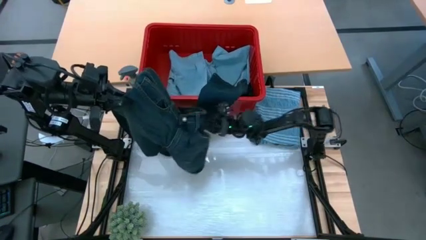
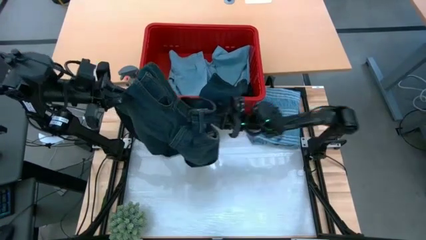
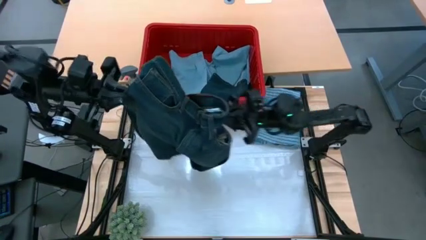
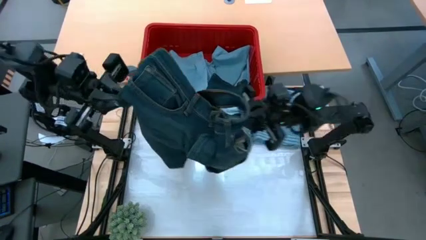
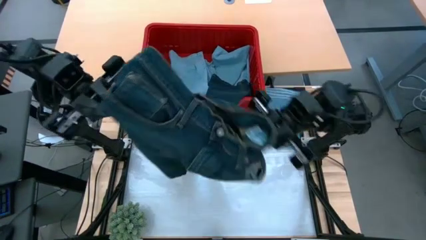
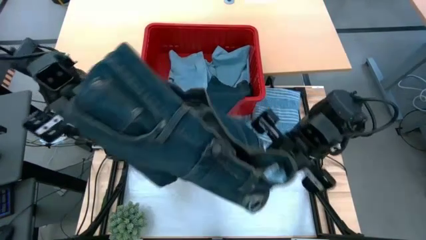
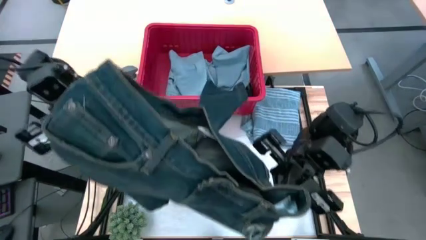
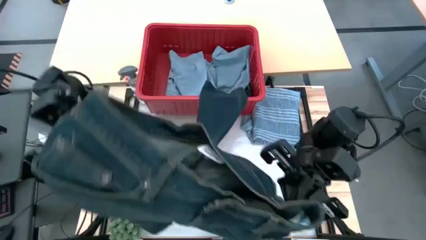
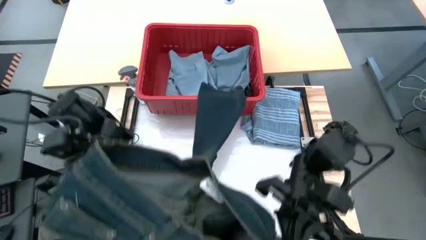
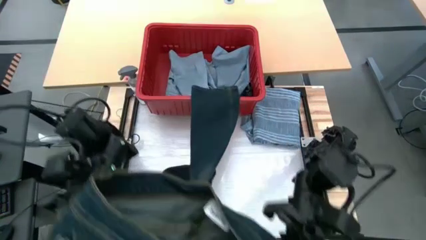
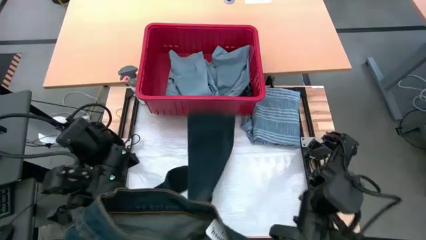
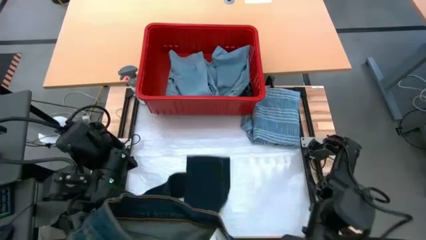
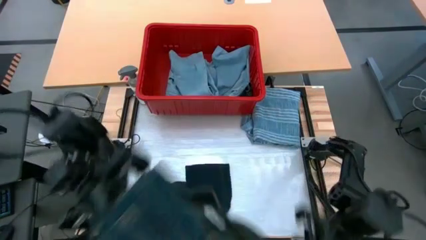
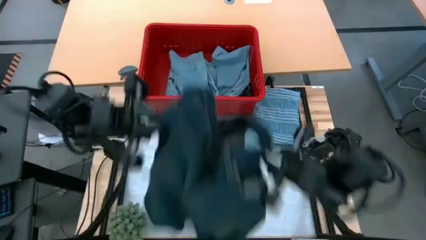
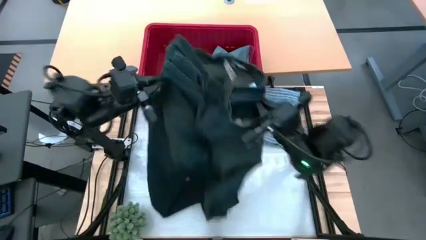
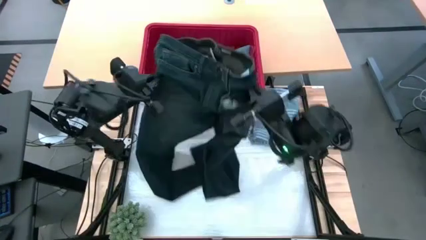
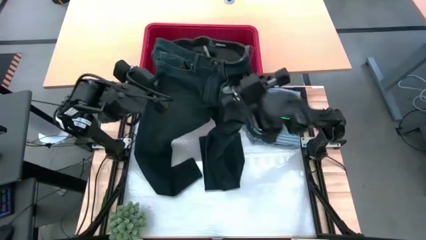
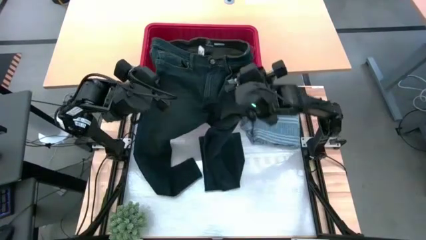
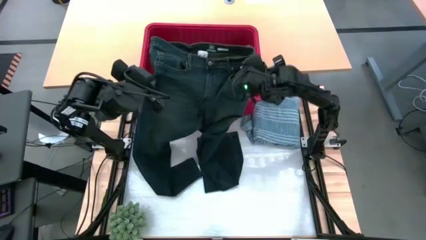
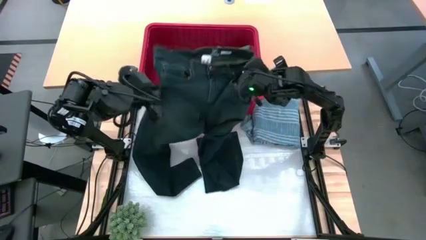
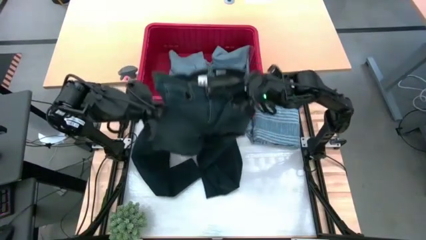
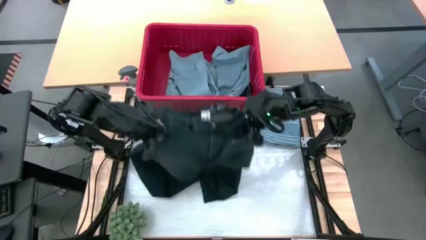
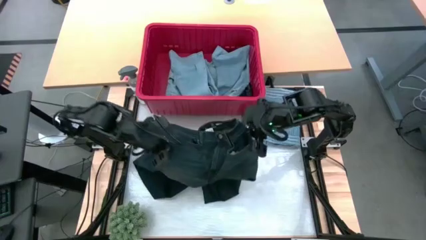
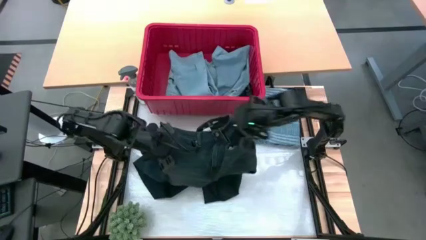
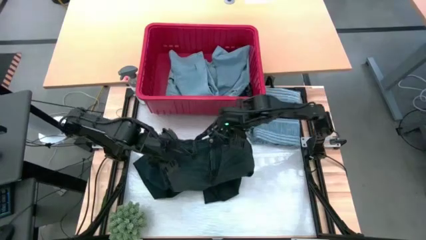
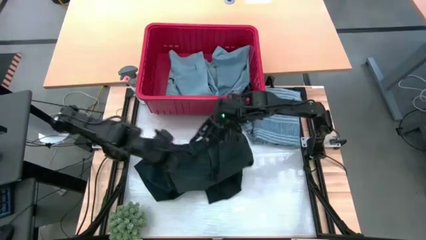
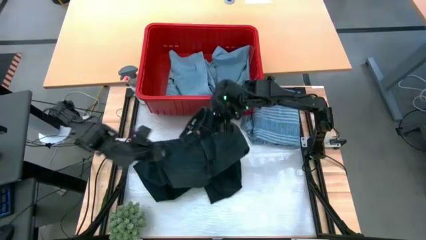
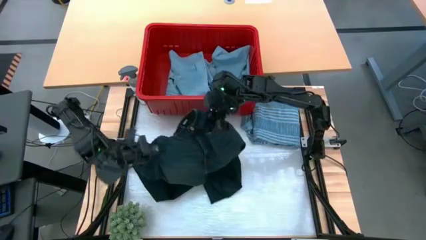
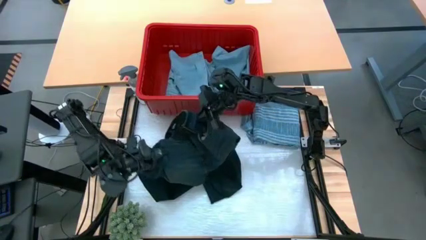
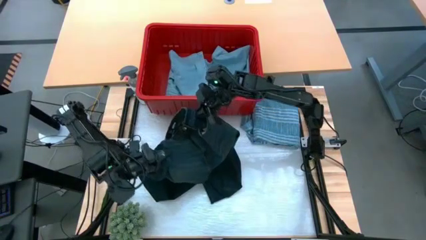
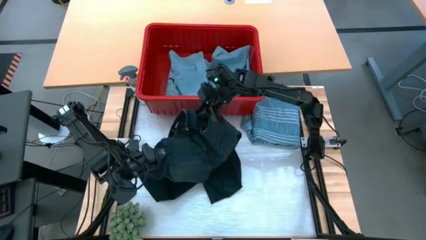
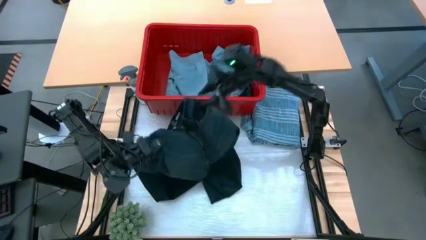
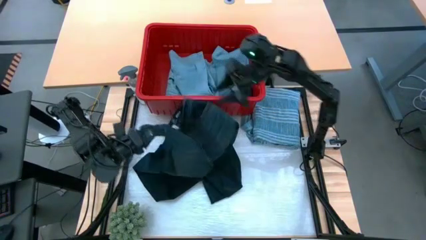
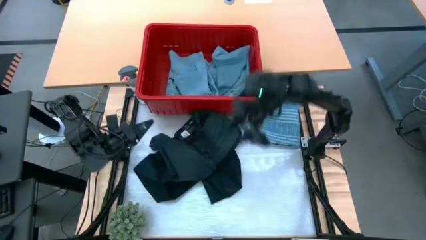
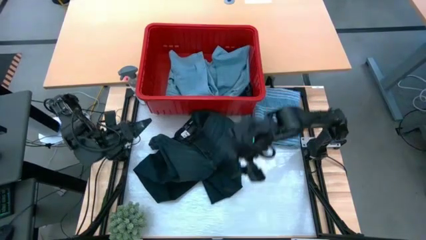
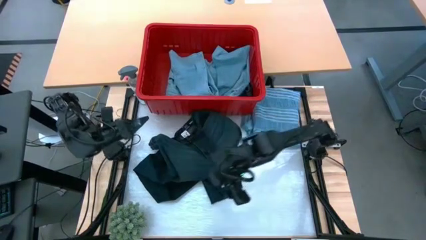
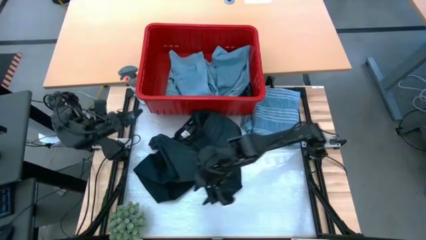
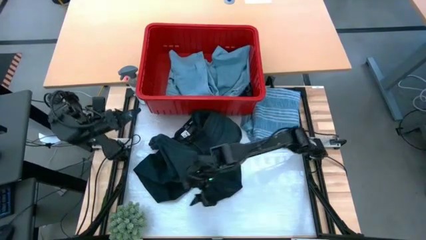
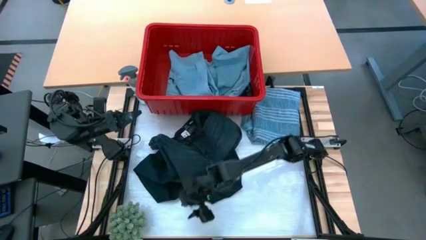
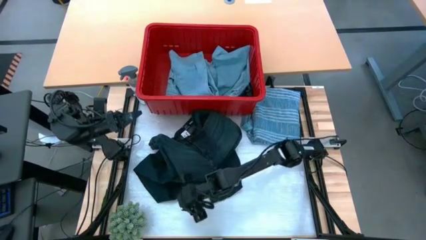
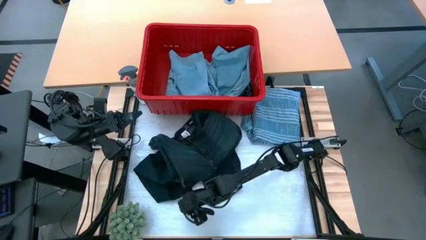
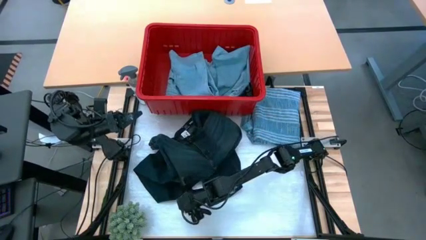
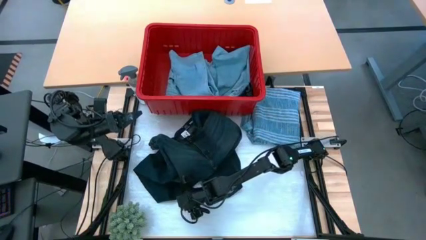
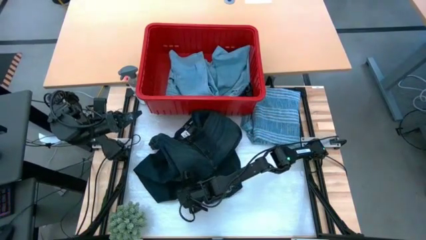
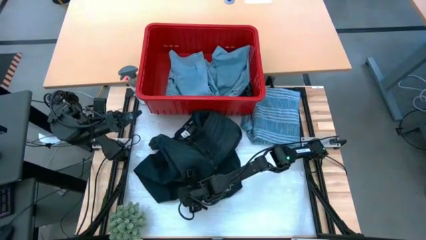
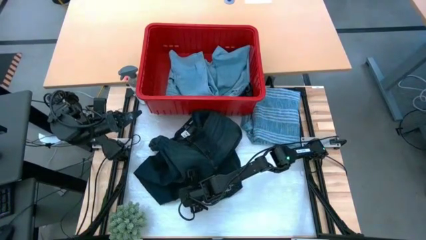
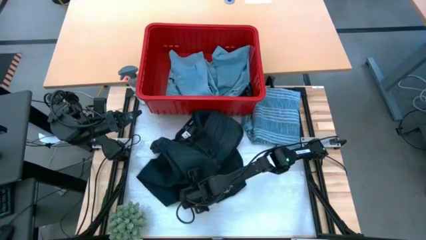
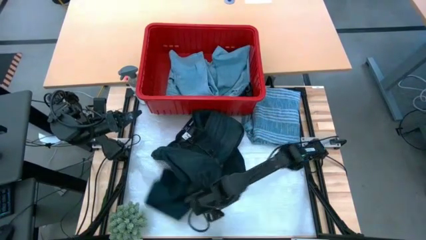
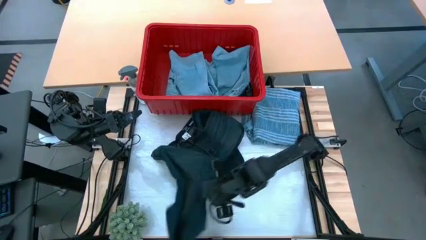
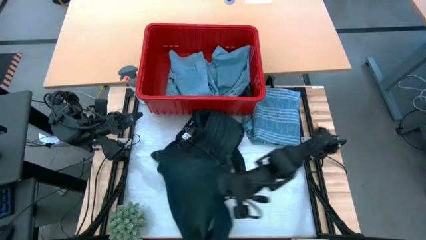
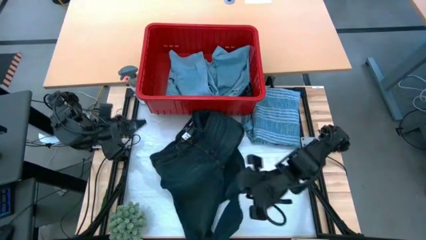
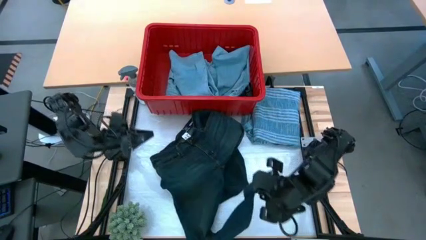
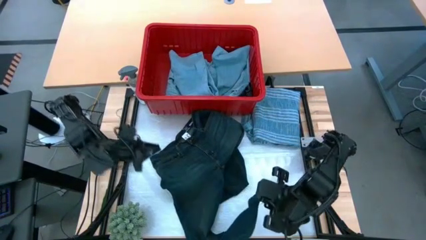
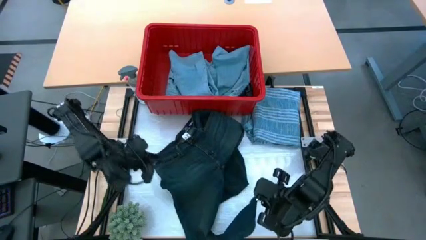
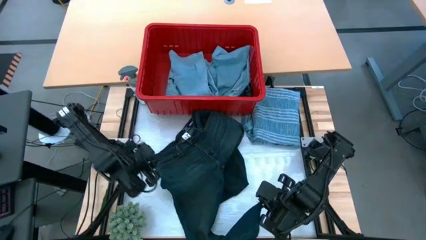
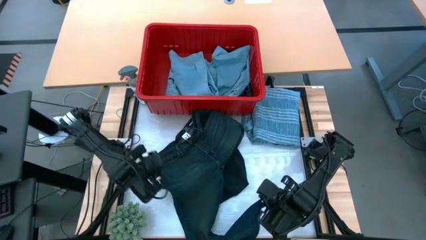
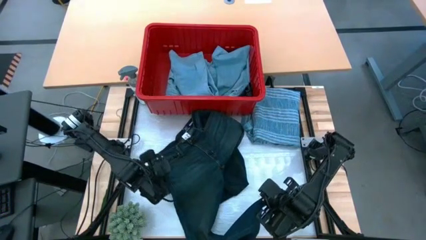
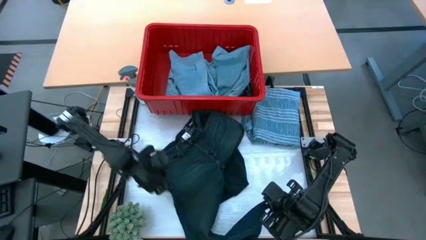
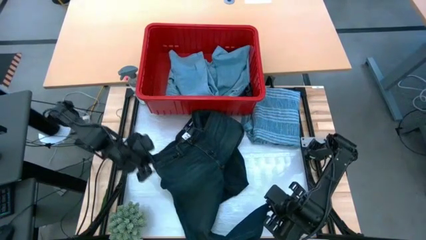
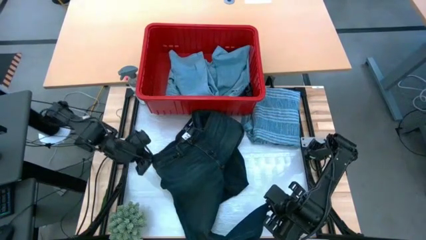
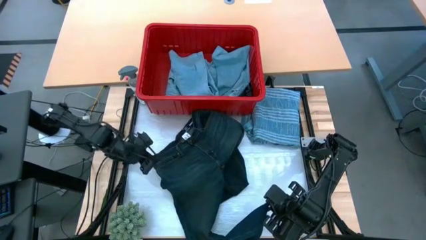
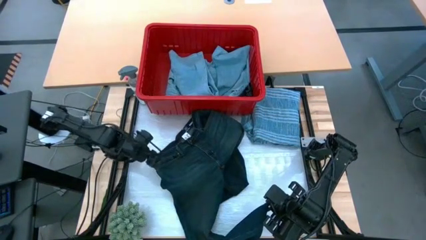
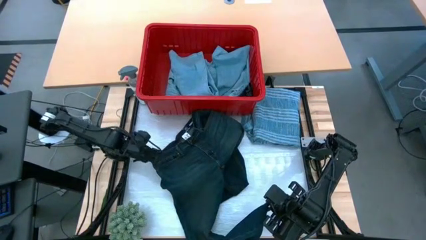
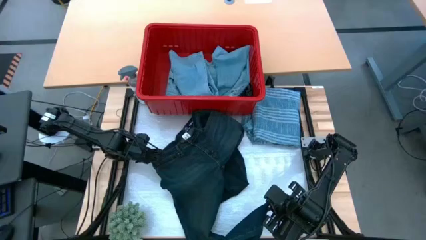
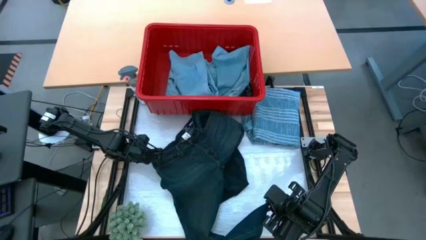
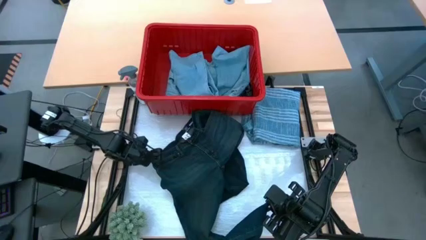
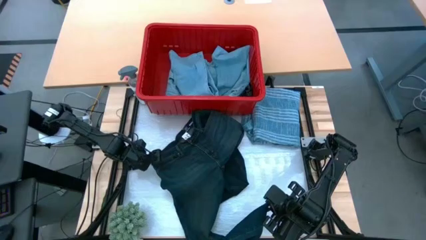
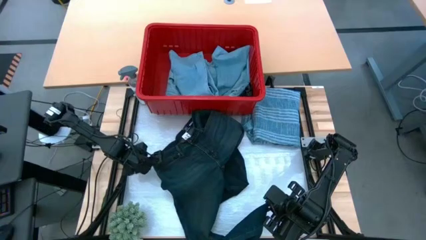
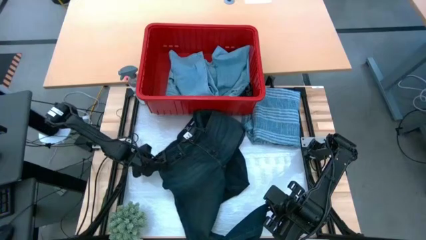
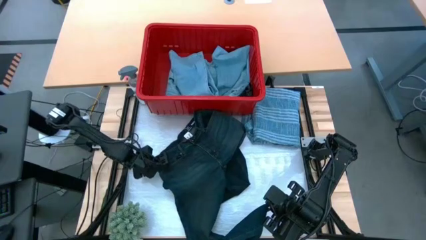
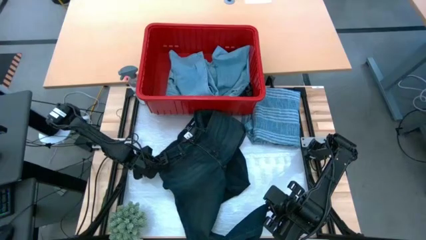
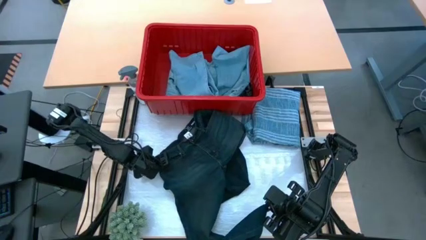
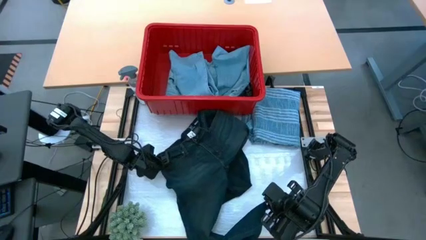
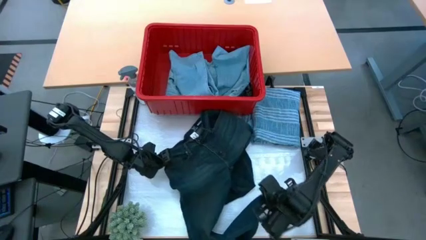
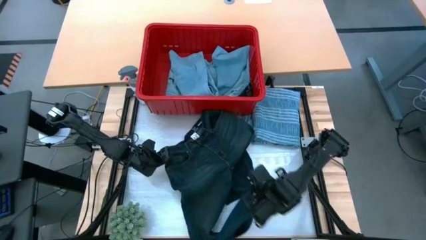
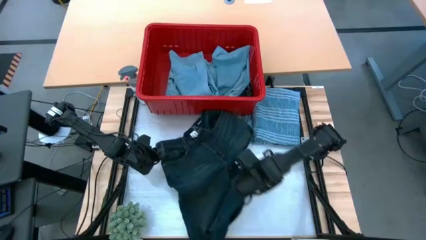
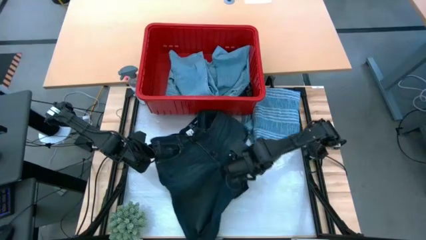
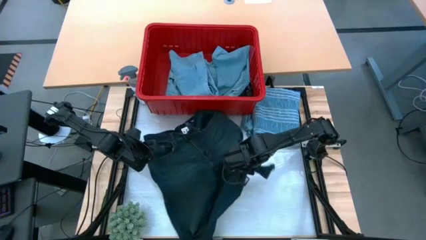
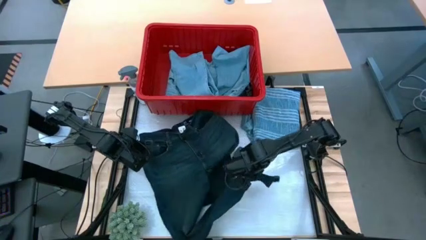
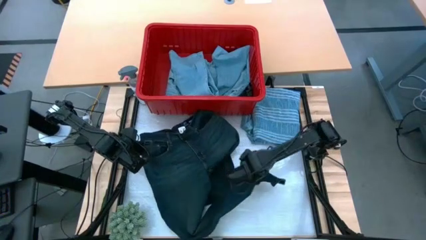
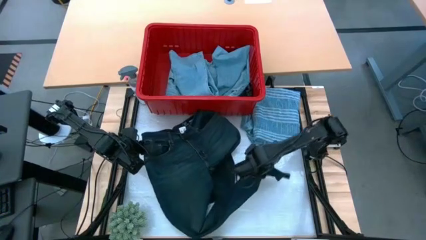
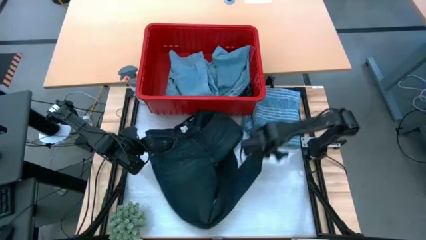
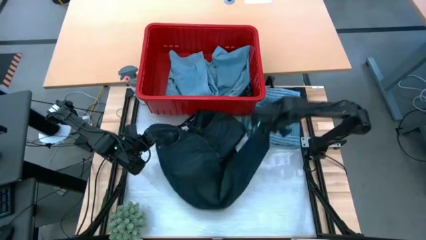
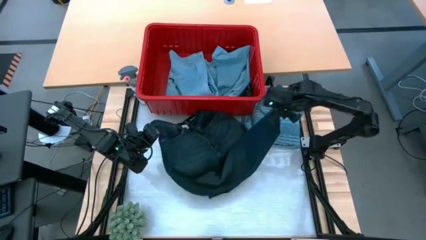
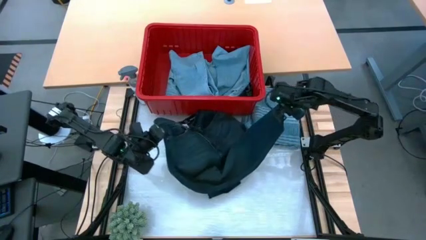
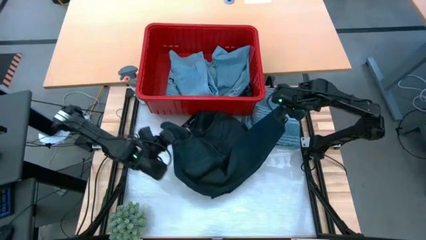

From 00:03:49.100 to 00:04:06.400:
Task: Fold Laundry from Bin
Fold the black pants
